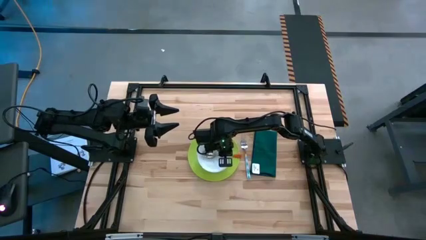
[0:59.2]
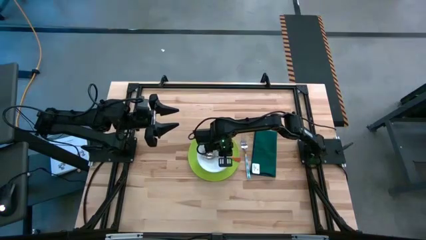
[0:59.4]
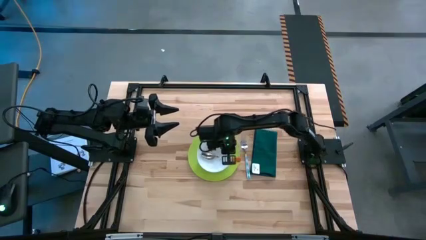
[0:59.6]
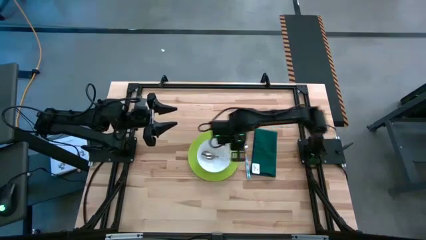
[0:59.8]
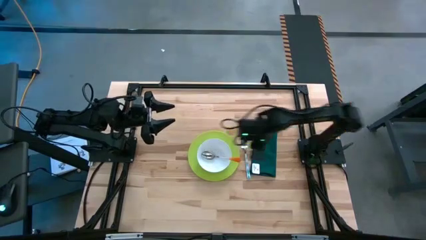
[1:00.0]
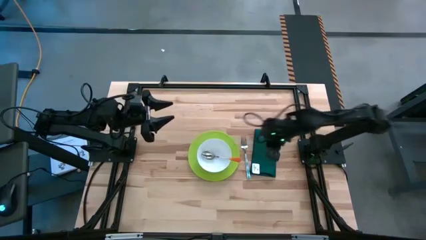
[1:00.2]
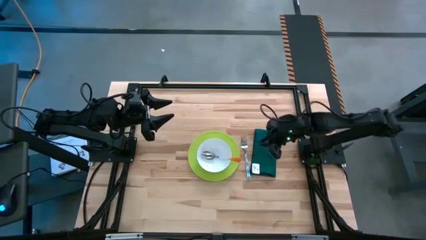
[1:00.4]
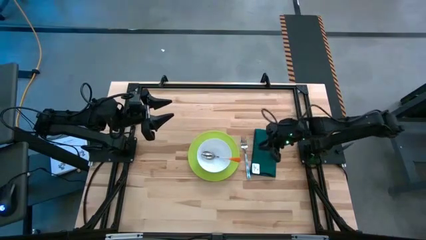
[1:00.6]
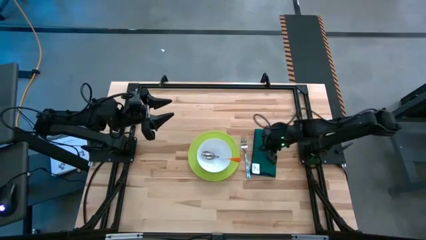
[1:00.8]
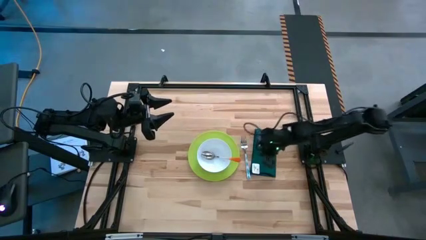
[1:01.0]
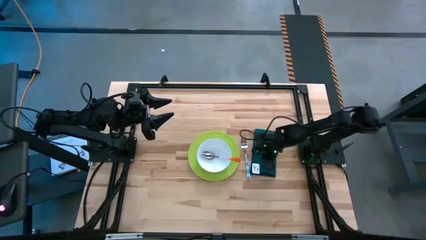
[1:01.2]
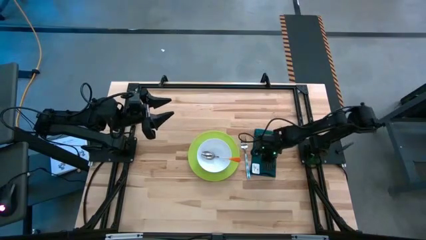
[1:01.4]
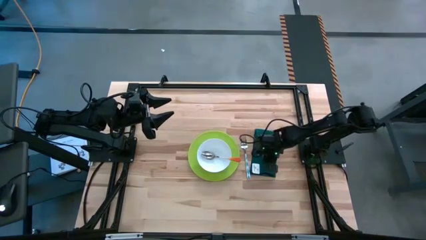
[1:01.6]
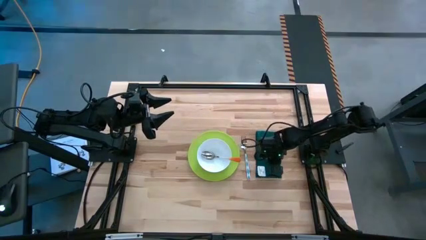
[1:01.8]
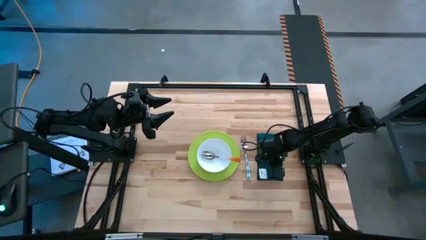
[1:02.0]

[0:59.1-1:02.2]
Task: Set table place
Adjust the green table napkin

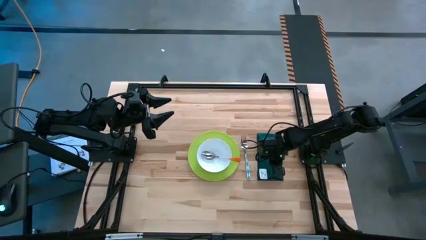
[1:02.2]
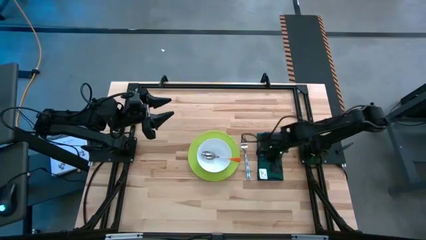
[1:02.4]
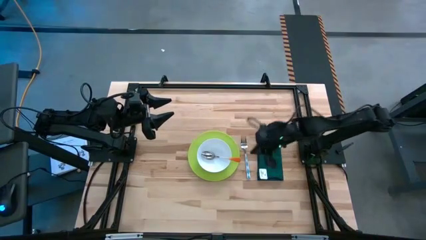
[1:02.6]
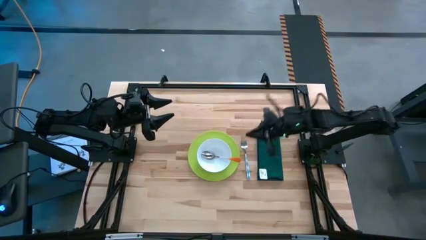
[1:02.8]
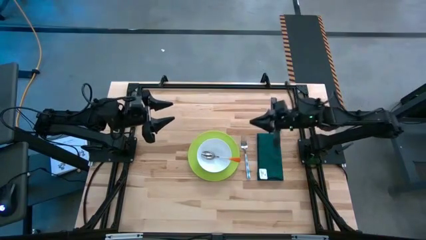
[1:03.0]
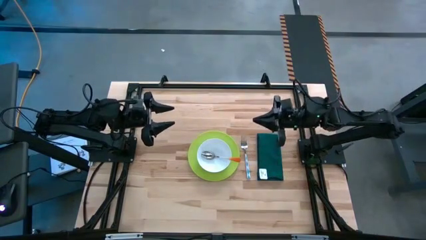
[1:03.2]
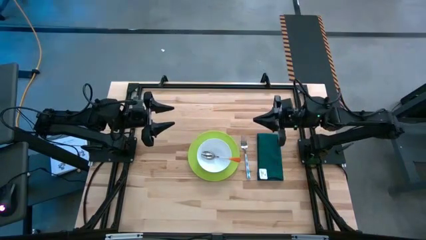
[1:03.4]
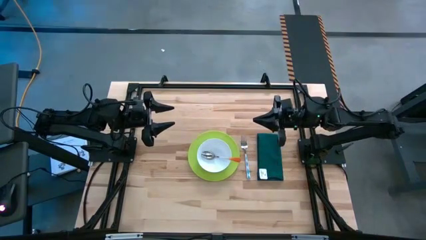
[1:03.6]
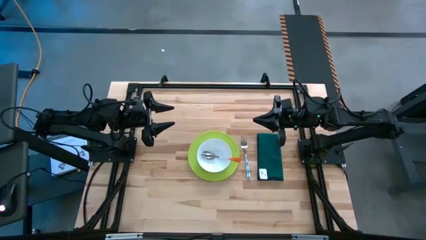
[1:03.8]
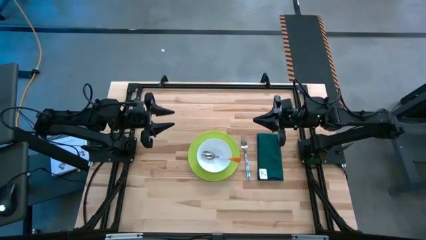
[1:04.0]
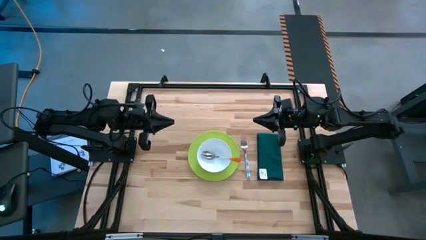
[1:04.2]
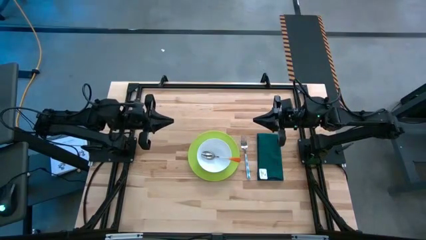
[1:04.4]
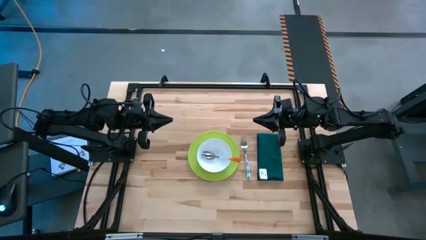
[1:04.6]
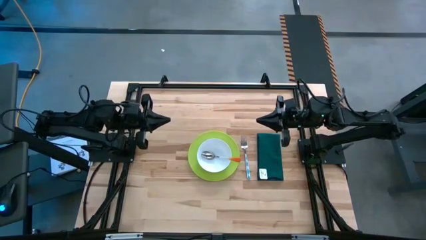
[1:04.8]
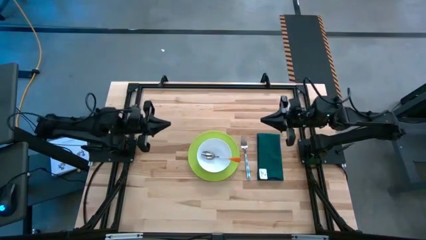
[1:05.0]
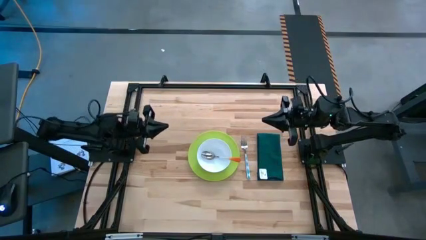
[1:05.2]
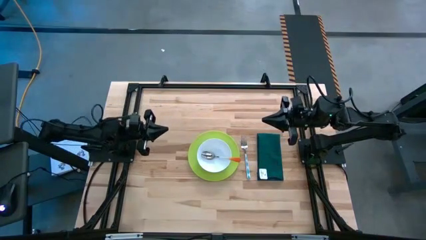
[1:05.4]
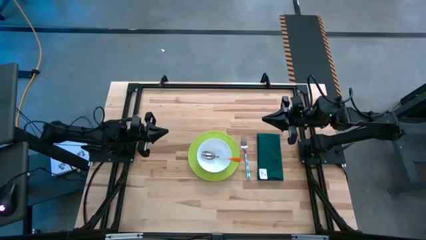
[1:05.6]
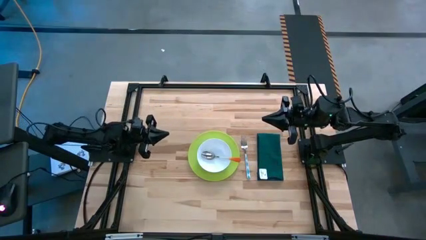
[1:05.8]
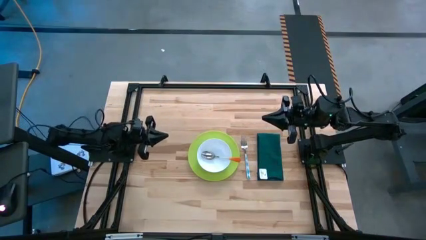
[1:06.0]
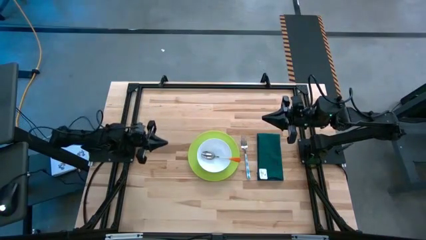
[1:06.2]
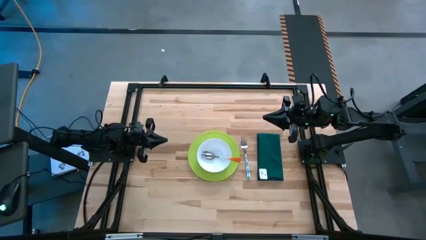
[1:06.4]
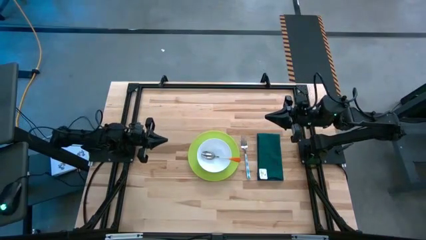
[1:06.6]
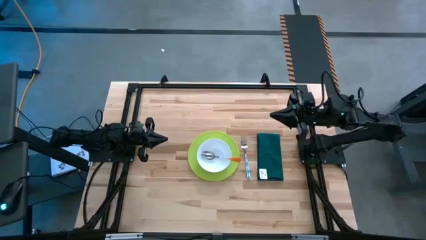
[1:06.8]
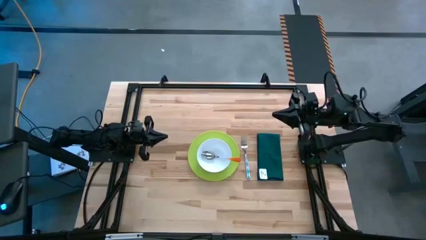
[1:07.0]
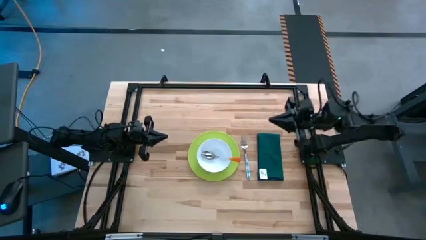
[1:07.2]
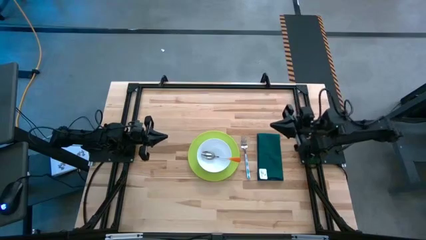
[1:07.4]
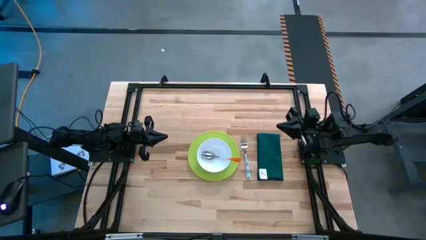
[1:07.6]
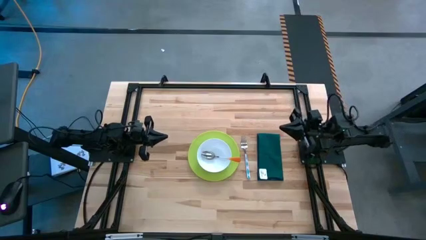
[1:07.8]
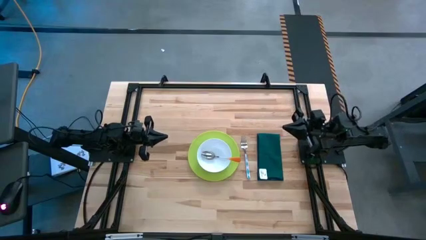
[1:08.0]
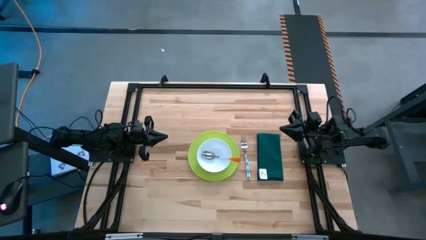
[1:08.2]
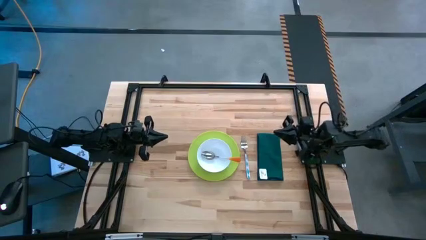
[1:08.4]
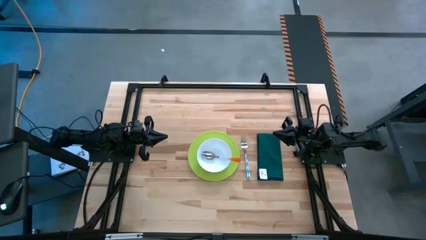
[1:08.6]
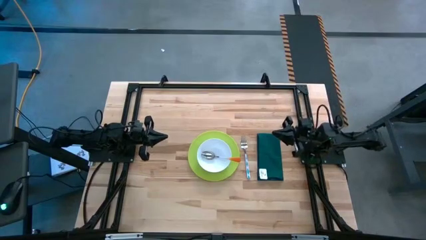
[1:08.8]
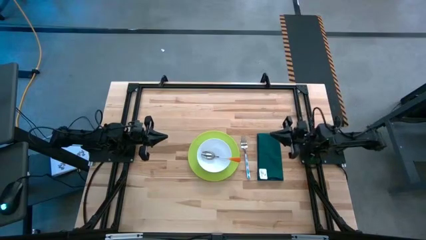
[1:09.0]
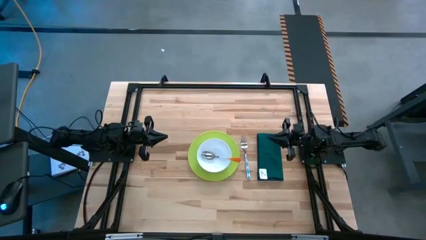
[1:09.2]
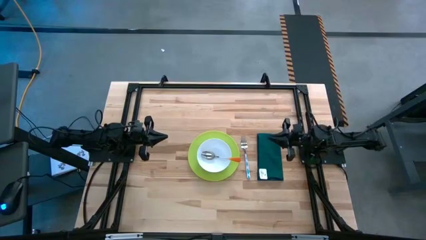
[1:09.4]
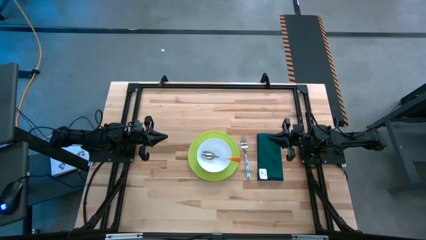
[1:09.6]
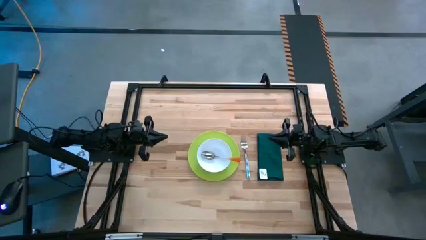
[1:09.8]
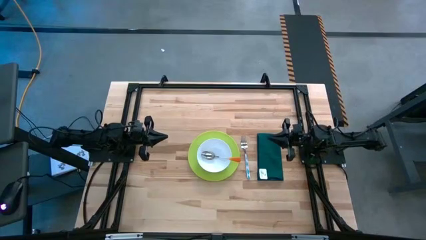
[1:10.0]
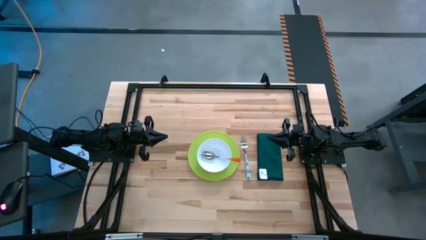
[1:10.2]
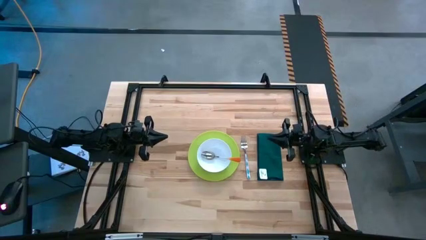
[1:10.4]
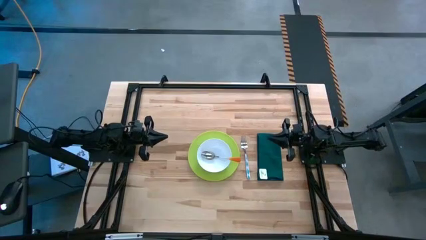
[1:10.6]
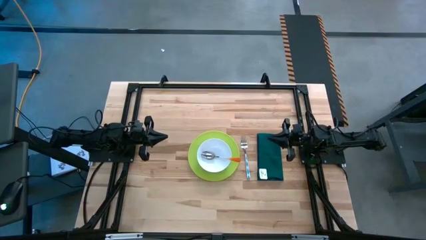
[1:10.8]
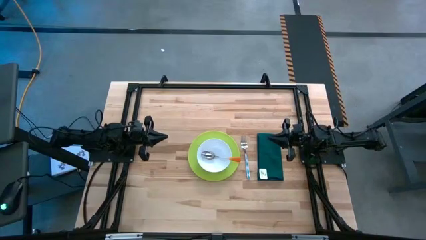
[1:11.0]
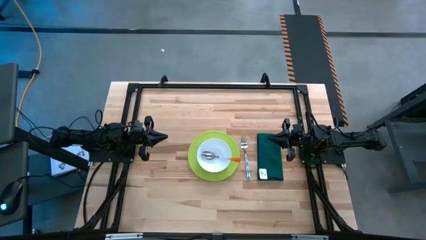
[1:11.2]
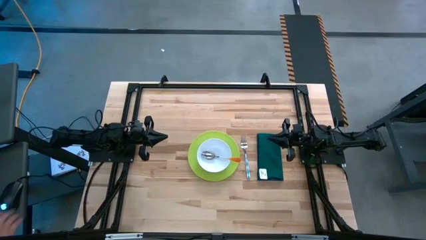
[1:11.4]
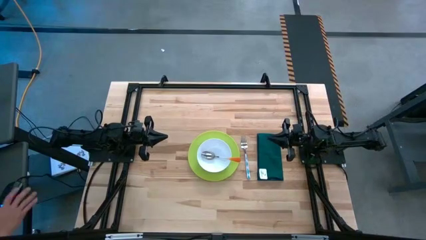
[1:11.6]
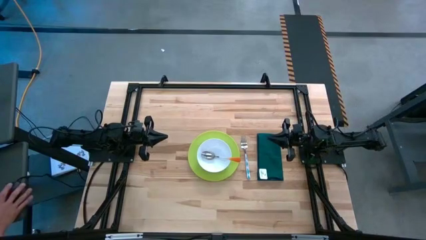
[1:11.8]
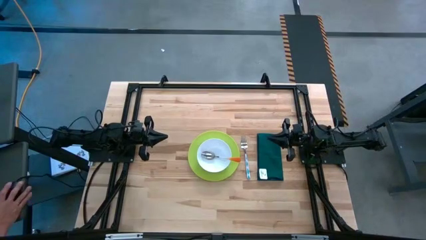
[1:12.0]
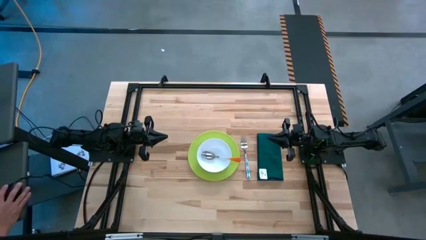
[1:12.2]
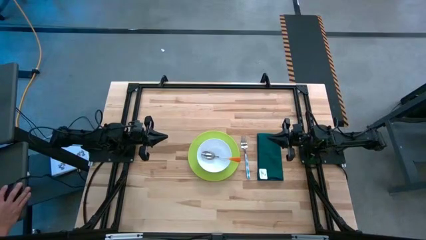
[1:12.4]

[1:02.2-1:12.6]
Return to Home Position
